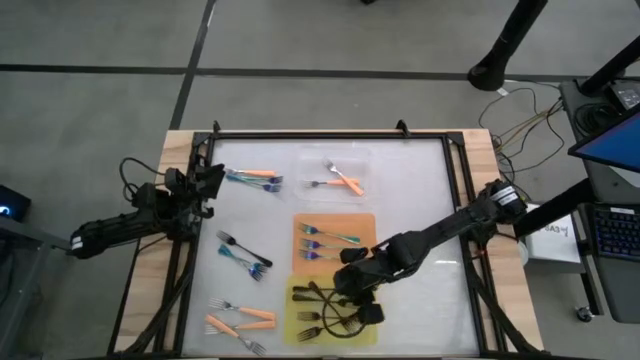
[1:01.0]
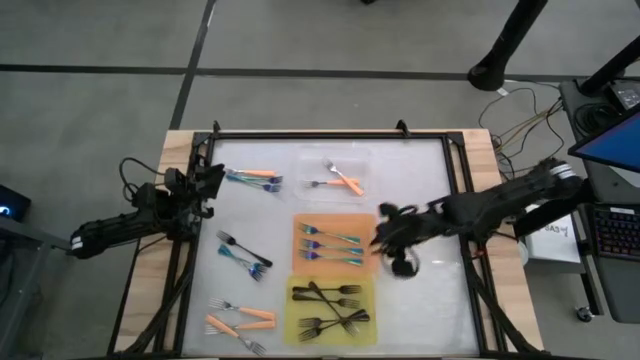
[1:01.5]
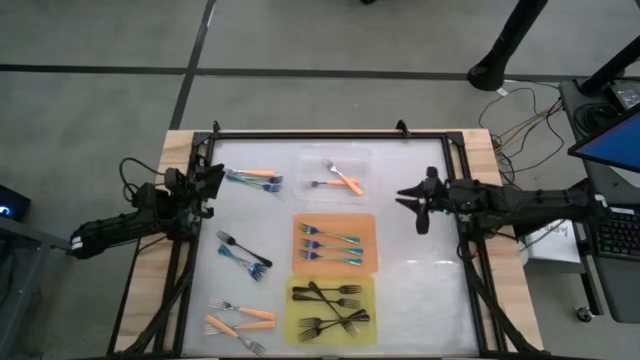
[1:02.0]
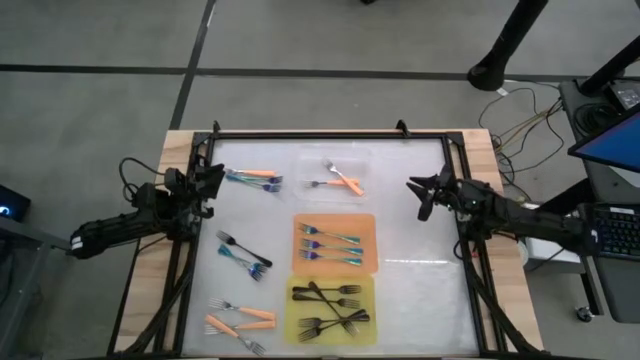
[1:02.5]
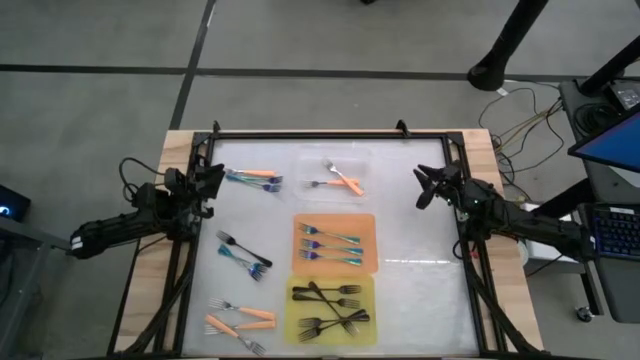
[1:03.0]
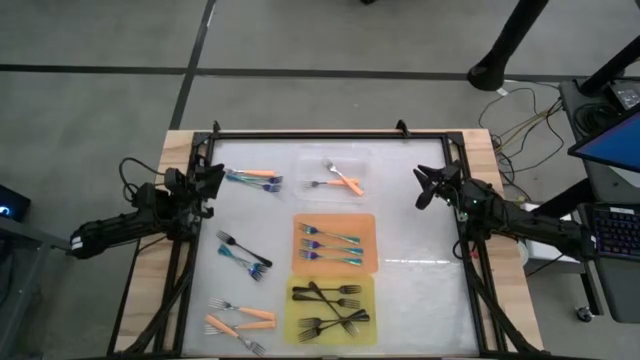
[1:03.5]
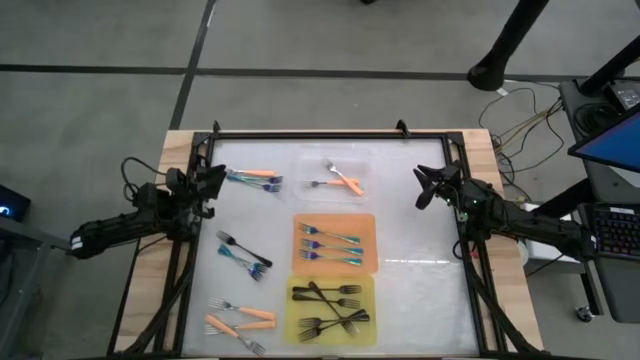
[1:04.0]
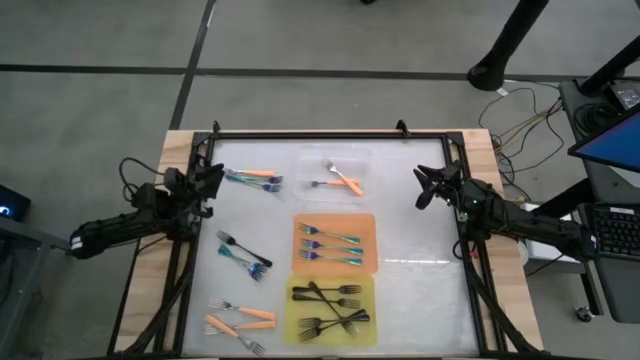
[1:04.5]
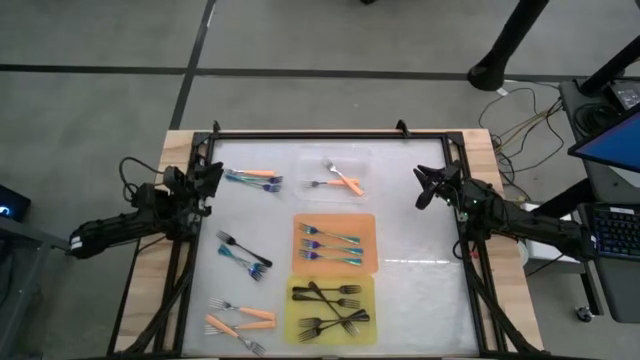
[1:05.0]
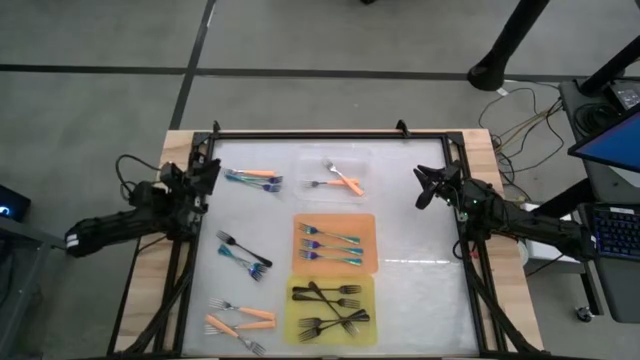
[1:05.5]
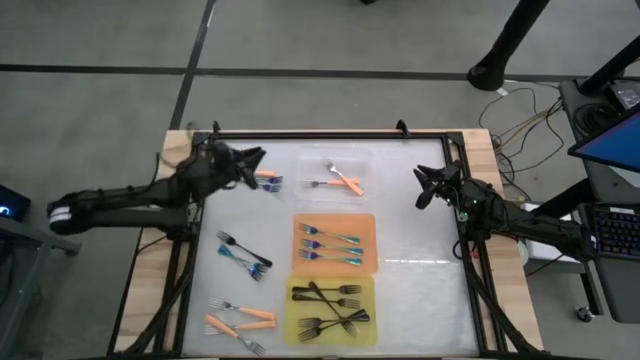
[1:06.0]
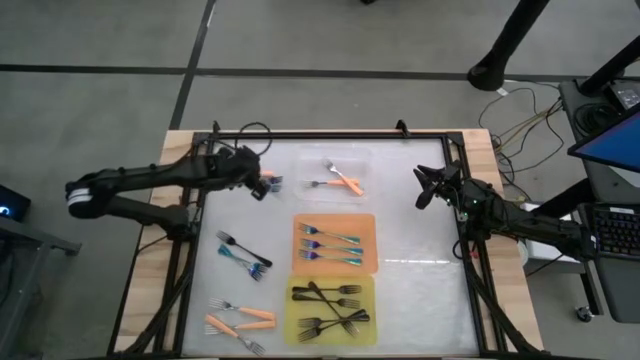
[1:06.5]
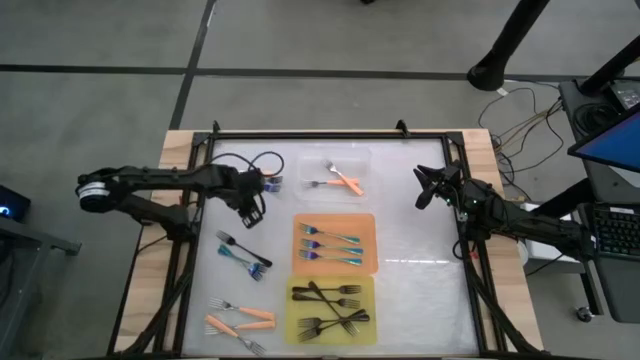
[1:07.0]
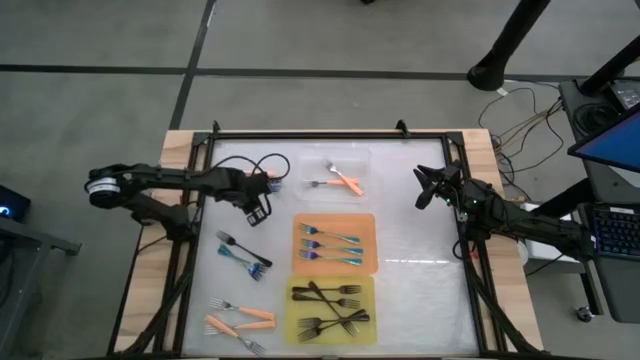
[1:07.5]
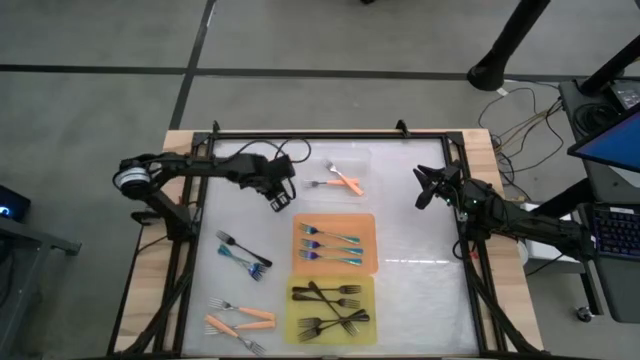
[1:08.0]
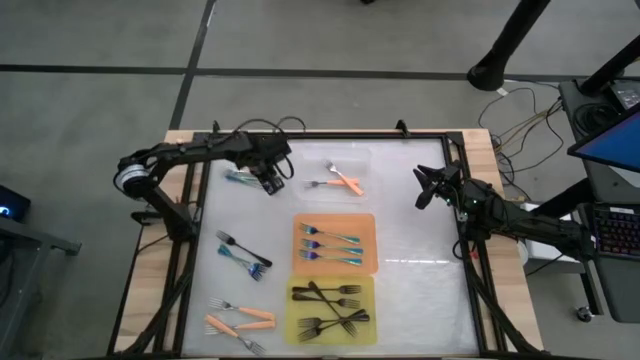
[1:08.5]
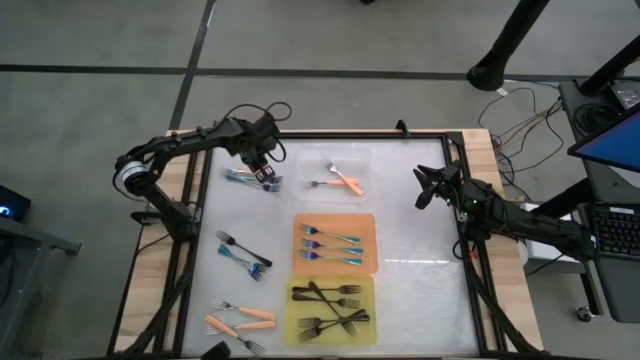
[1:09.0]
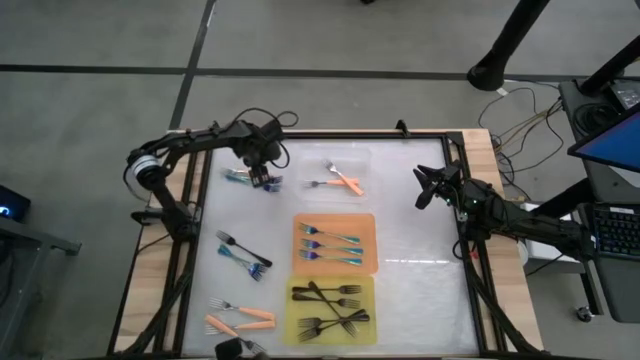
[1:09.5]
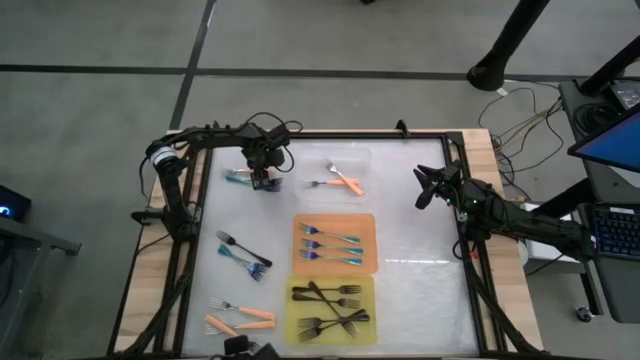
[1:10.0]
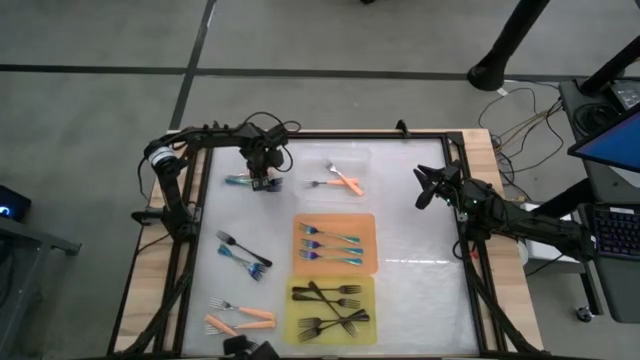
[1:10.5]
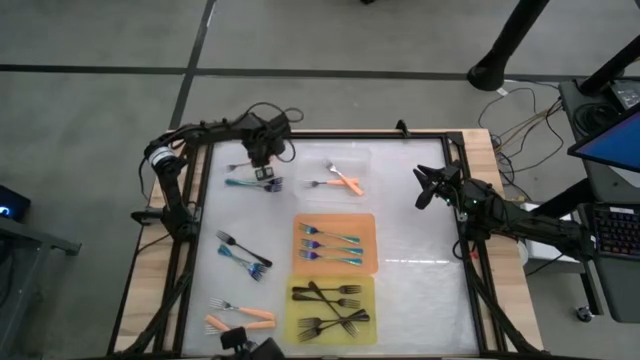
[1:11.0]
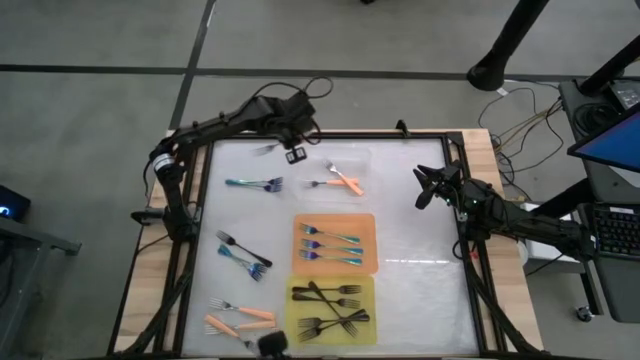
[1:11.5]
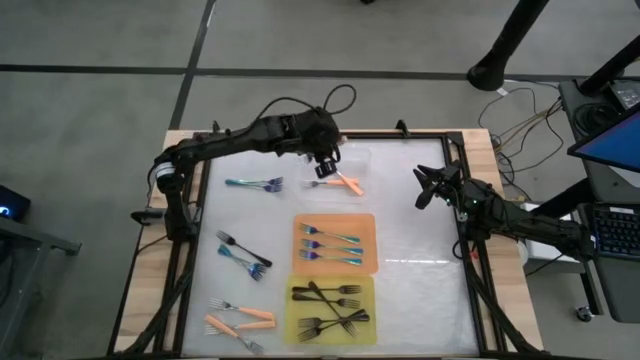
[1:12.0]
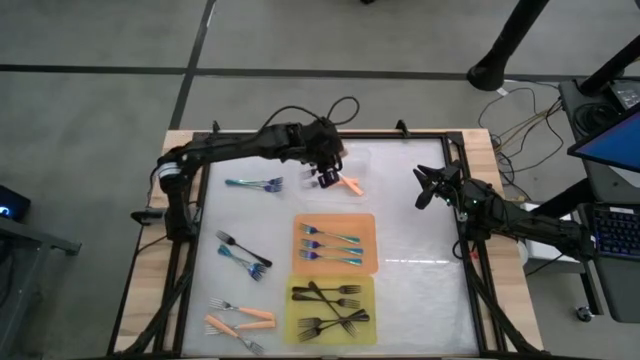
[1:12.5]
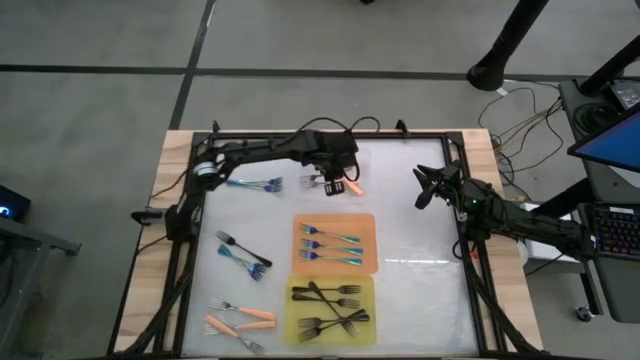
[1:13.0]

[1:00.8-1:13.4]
Task: Sort silverware by color (type)
Put the orange fork into the white bin

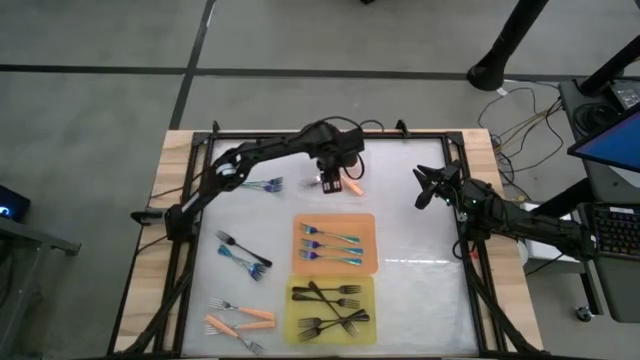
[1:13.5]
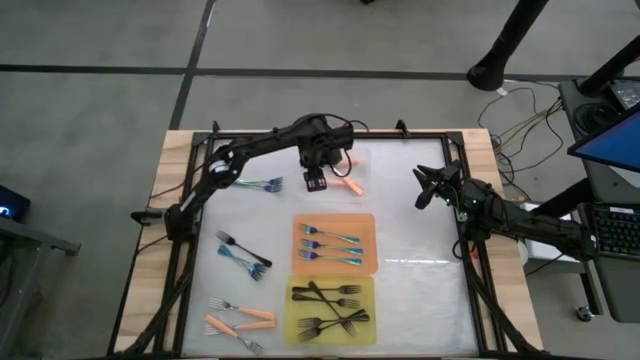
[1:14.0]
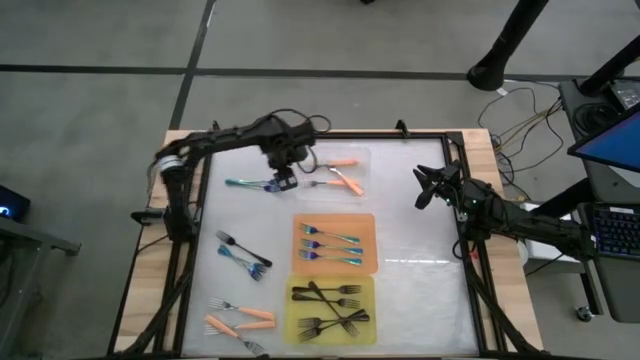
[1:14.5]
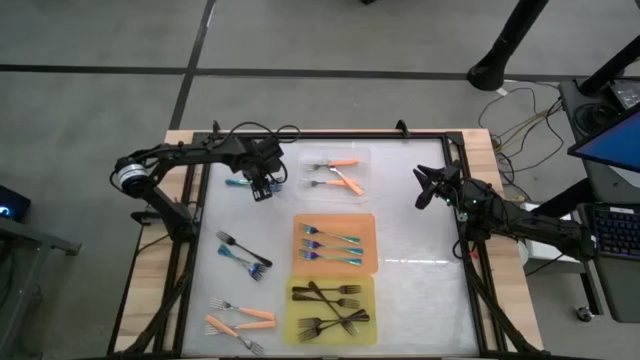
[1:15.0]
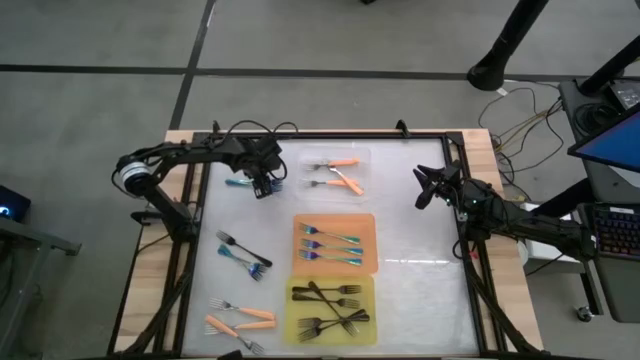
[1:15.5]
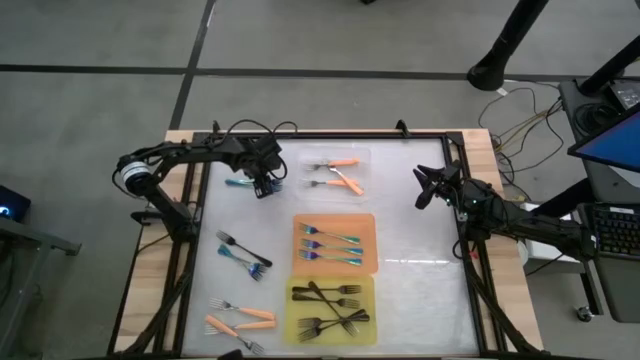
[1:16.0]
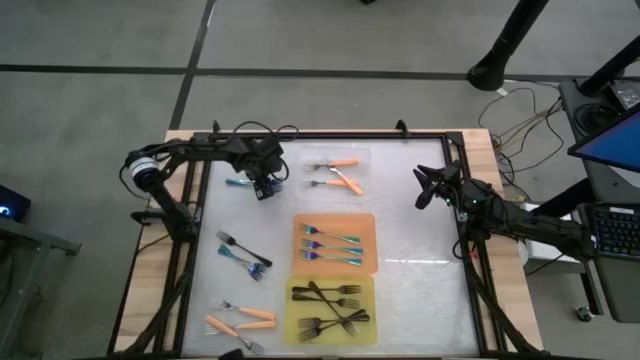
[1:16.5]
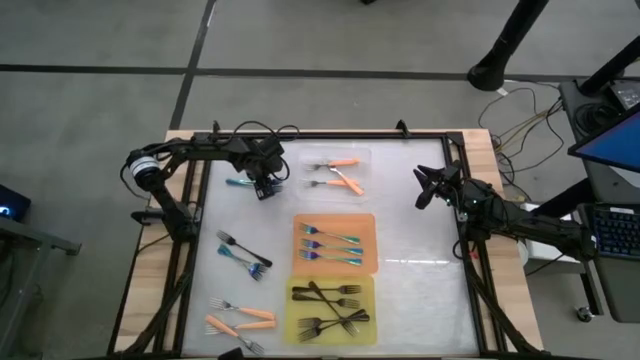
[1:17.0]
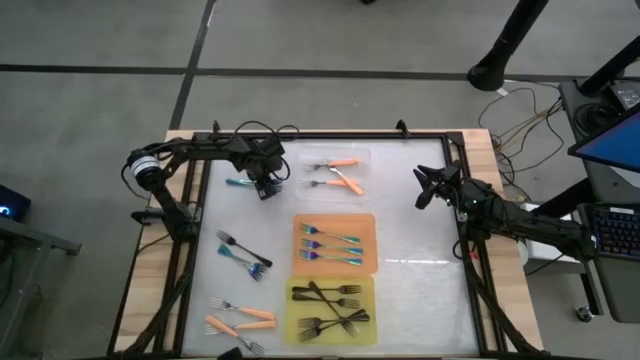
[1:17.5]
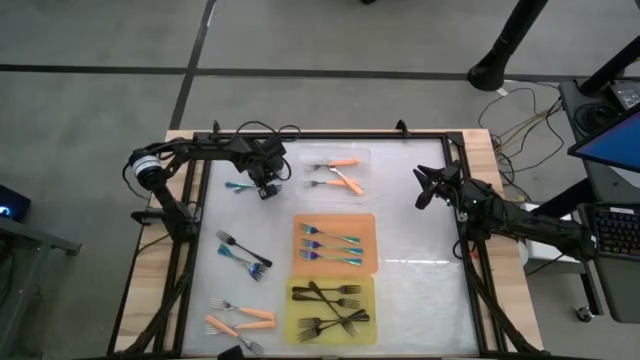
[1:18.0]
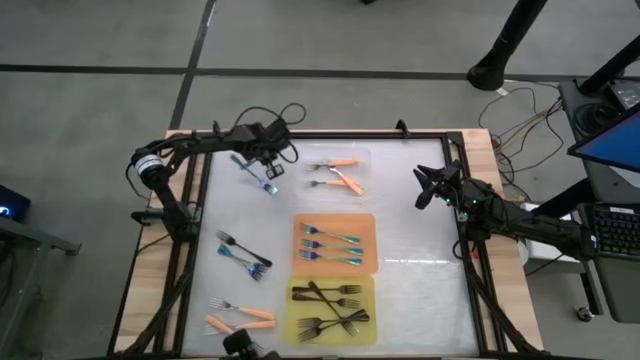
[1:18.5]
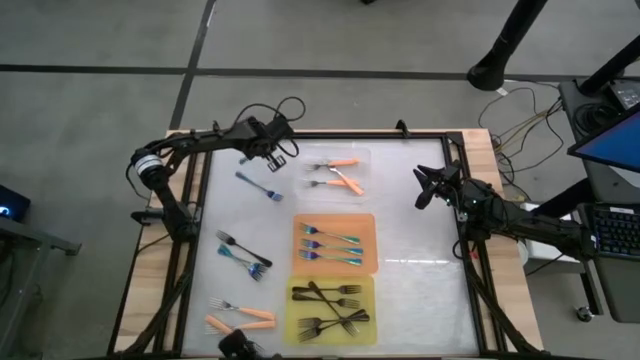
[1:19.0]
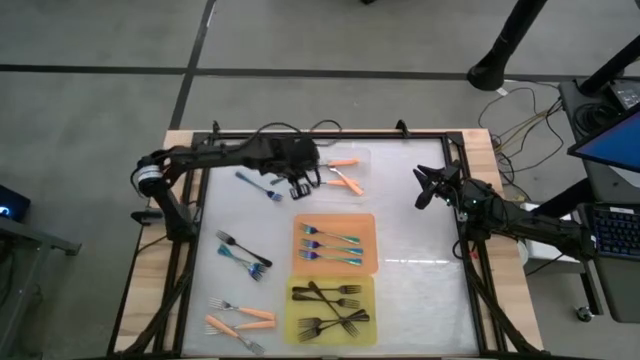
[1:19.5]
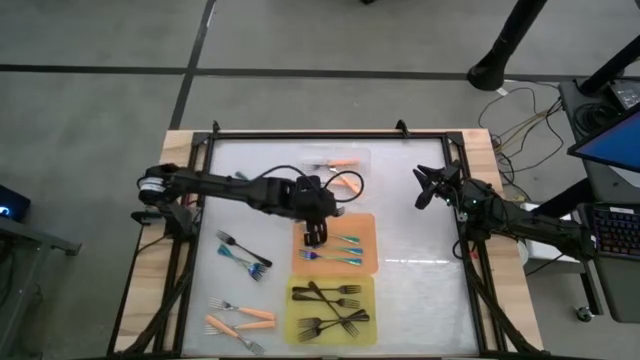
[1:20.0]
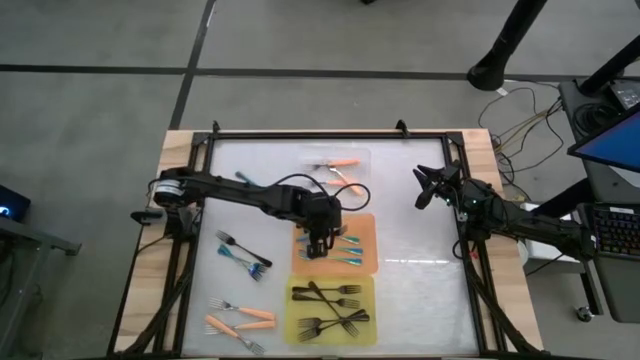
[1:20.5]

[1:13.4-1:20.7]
Put the blue fork into the orange bin

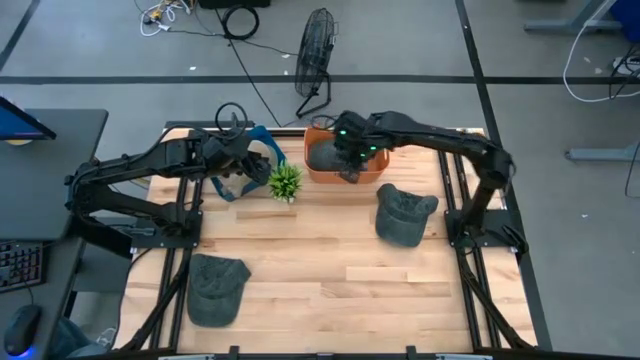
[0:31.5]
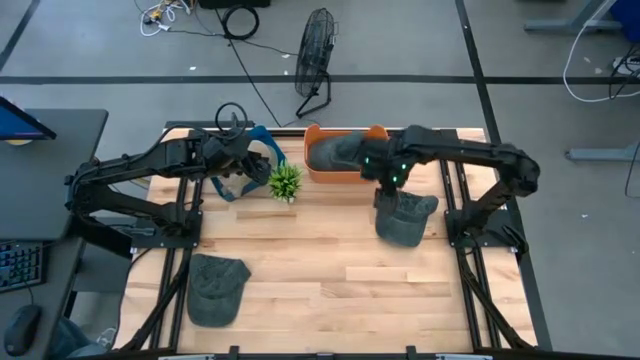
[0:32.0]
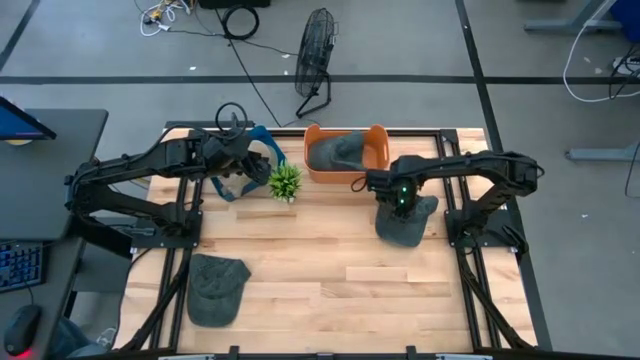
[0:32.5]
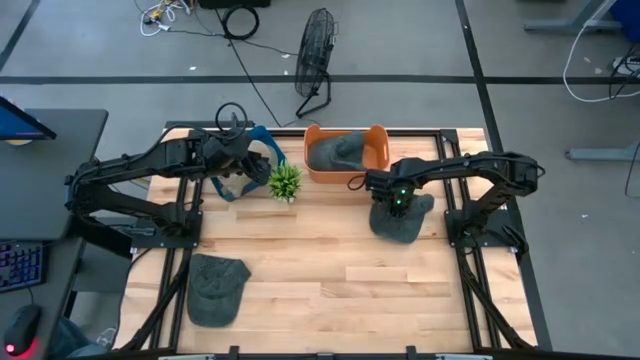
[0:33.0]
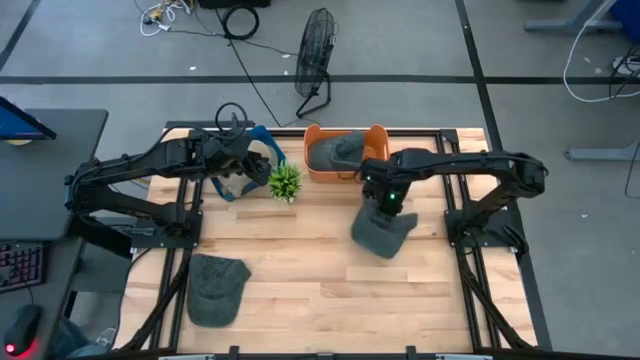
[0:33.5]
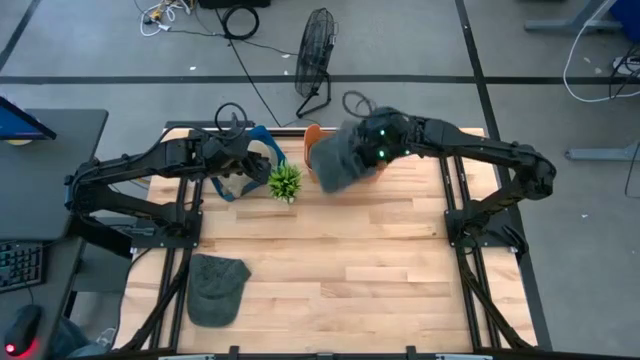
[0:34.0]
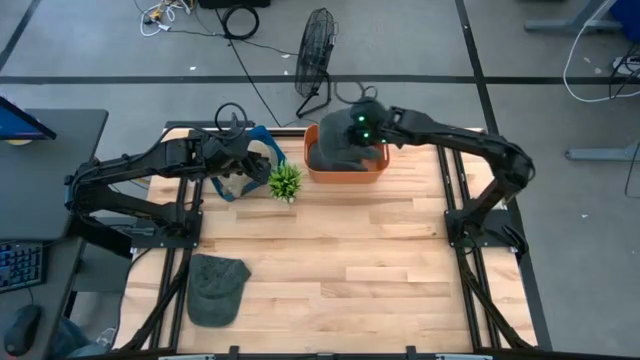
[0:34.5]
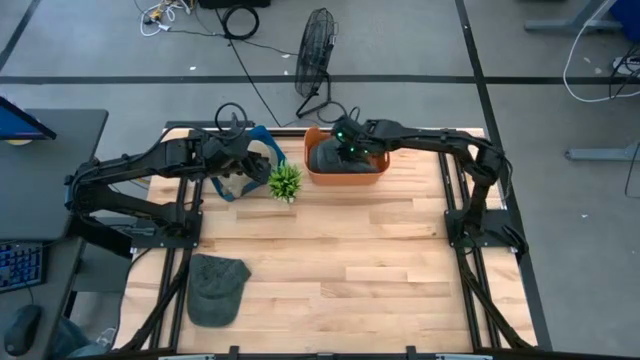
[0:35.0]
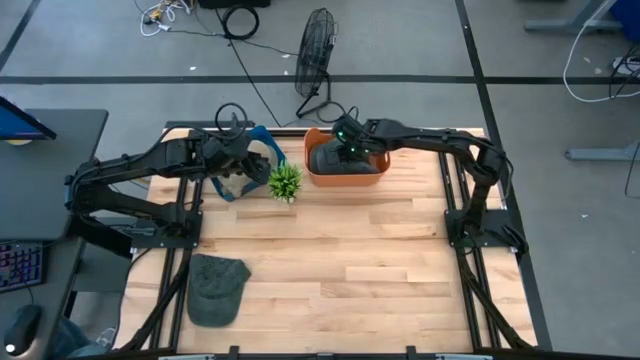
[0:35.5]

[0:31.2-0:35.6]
Task: Pick & Place hat
Put the top black cap into the orange bin
